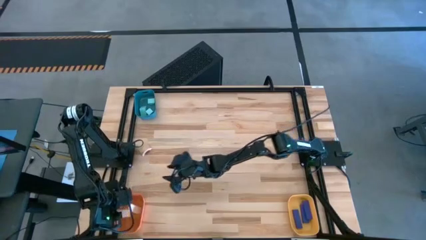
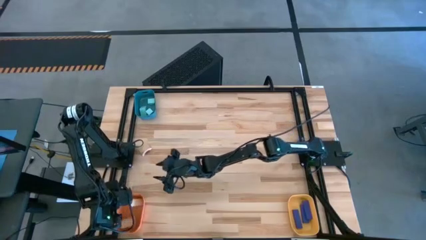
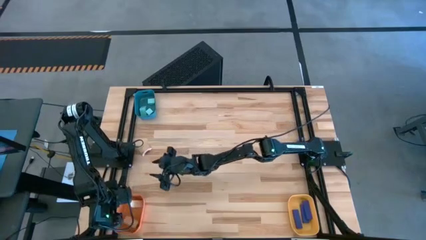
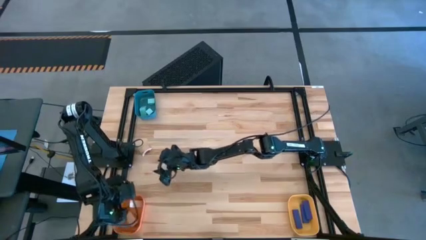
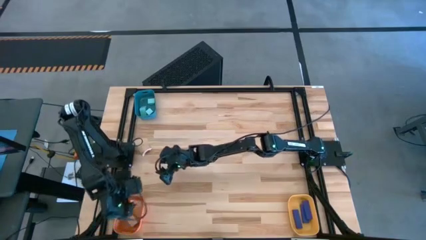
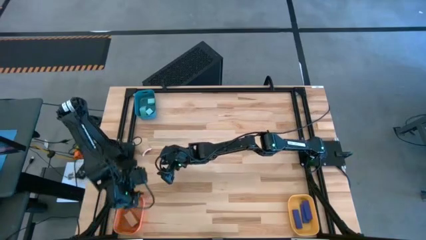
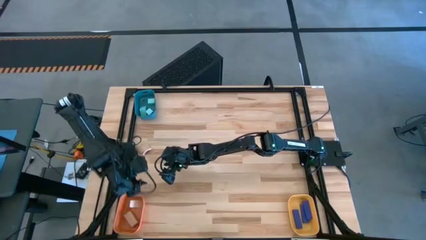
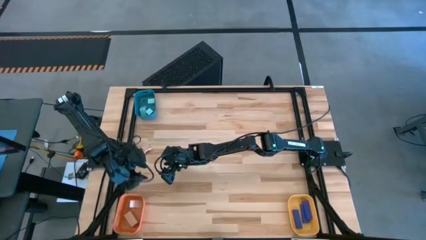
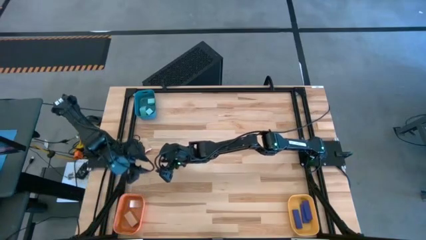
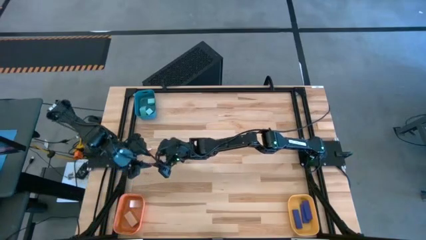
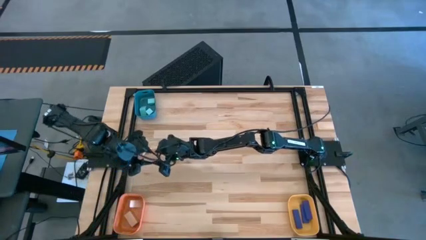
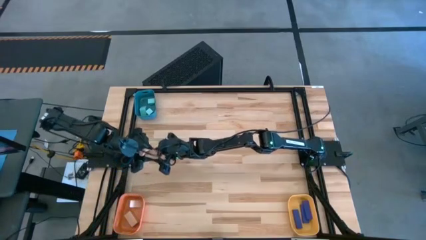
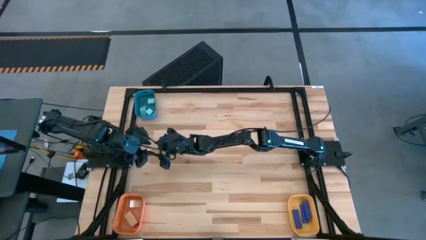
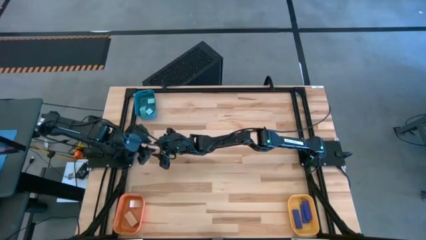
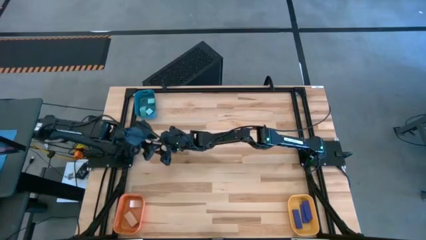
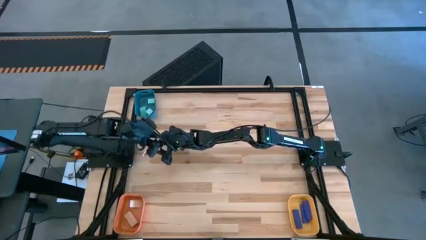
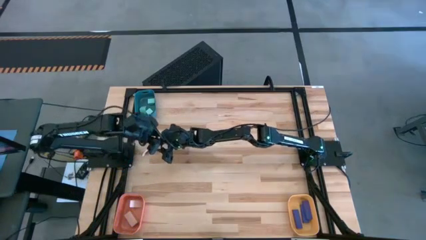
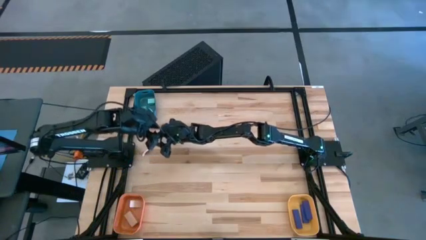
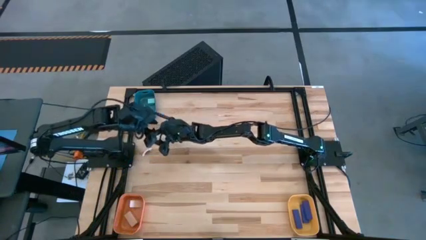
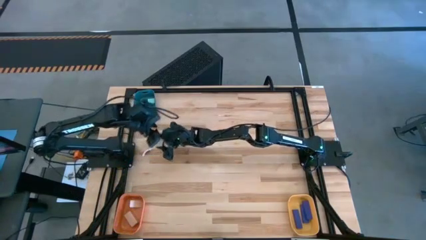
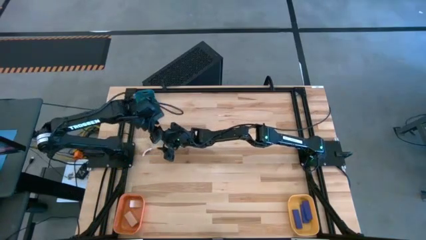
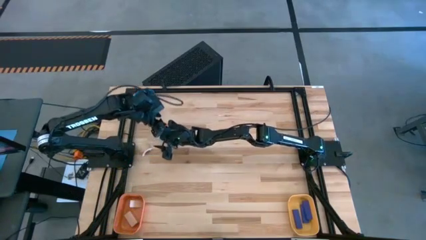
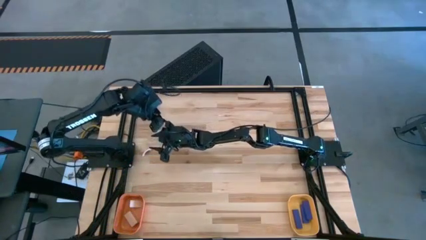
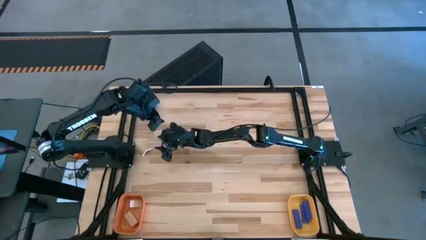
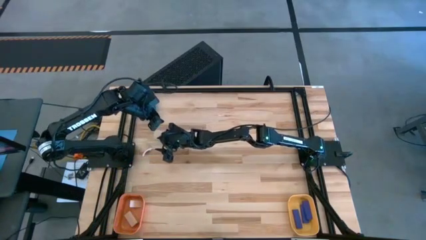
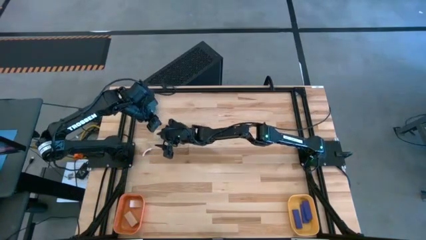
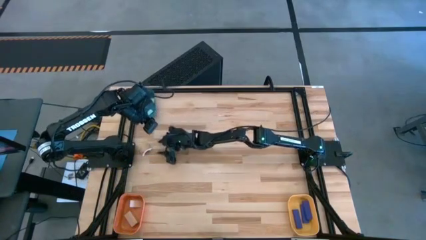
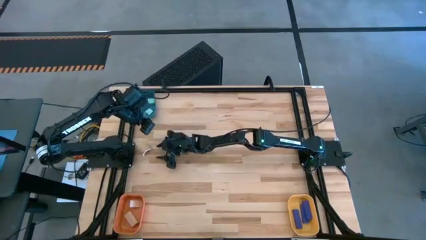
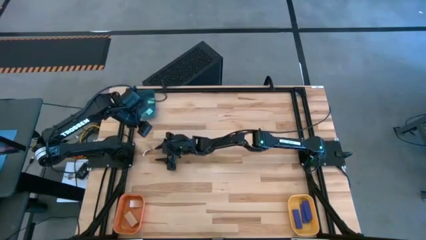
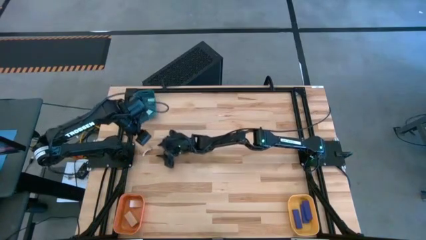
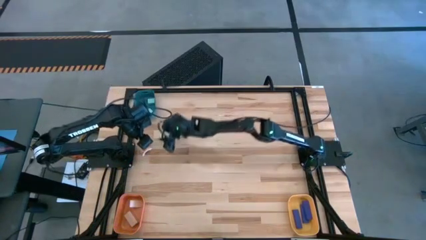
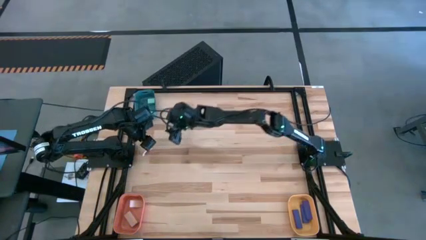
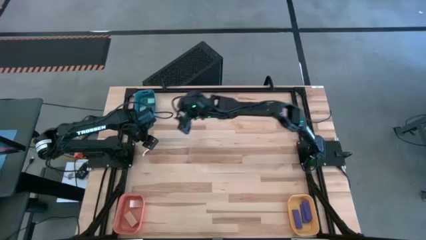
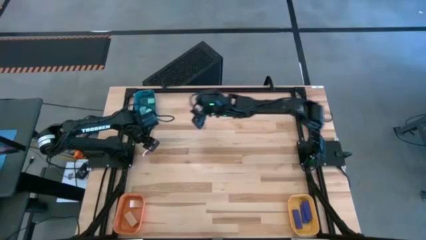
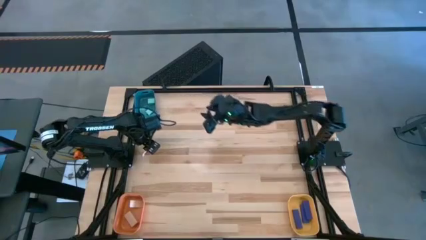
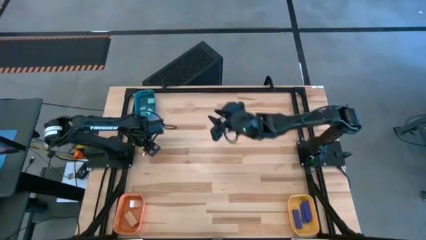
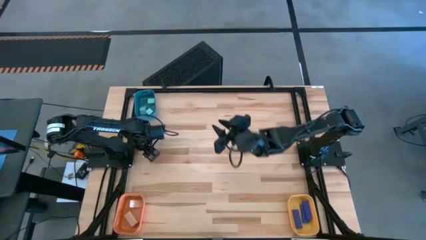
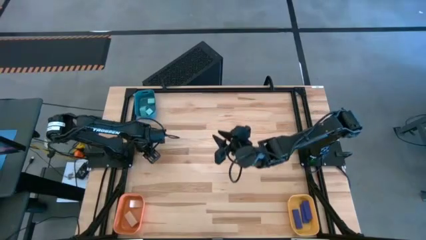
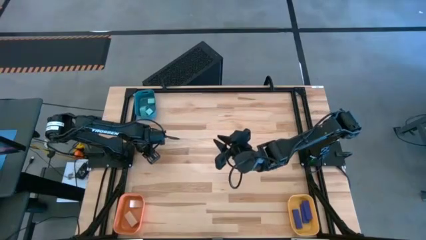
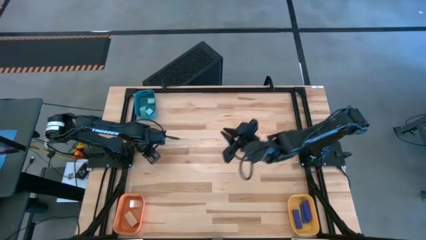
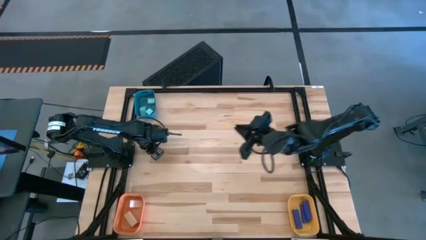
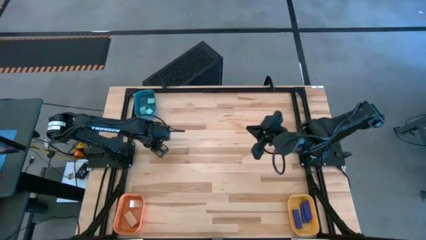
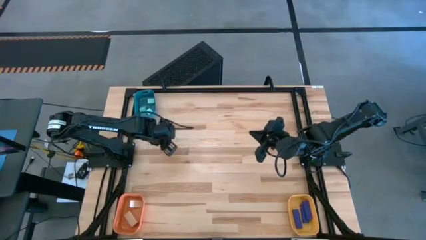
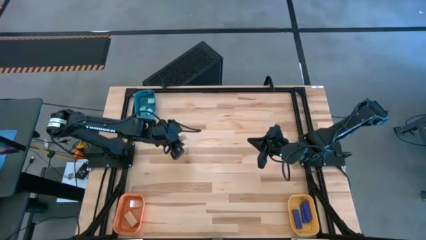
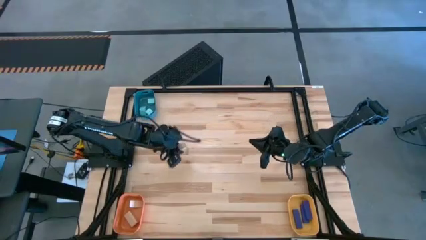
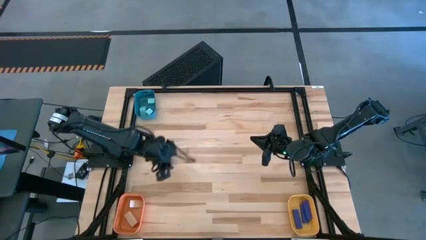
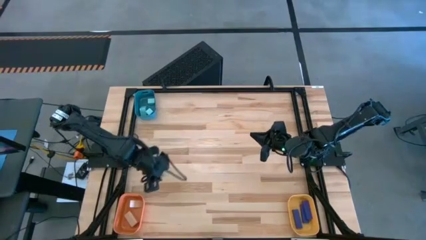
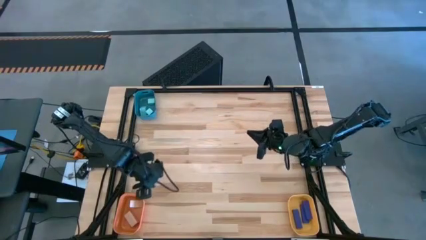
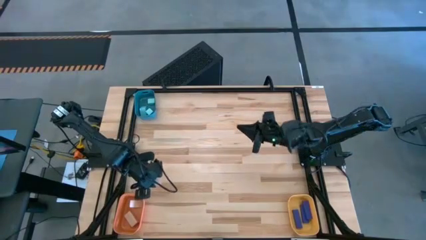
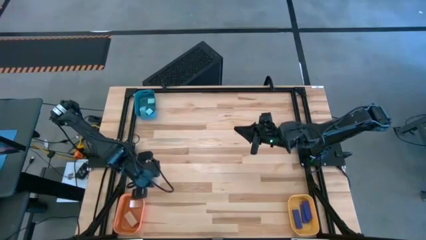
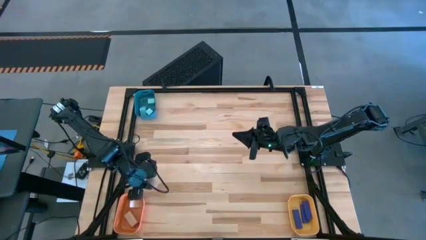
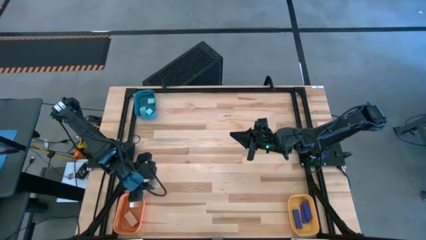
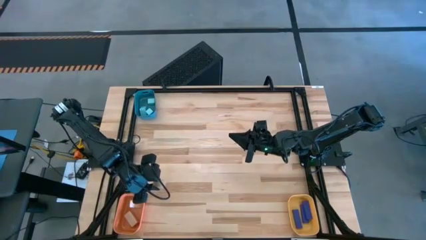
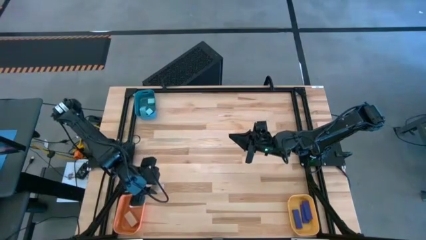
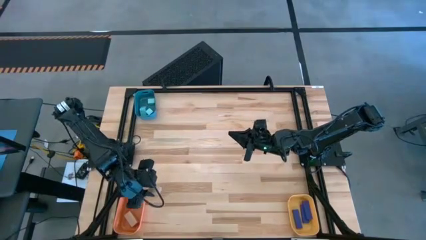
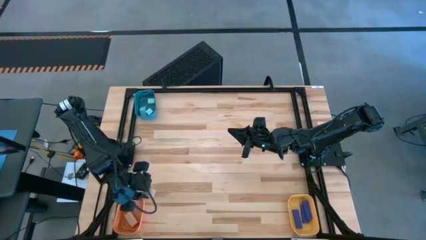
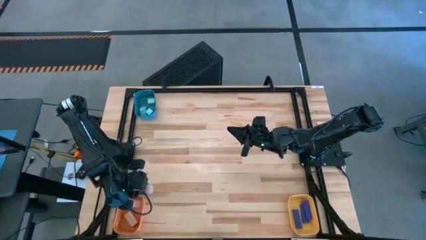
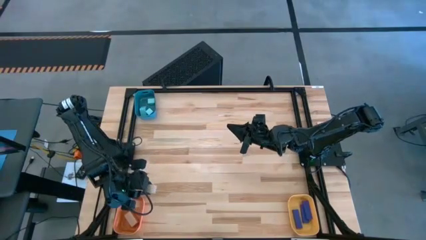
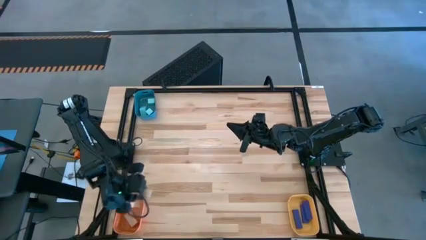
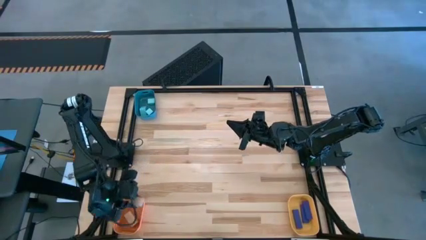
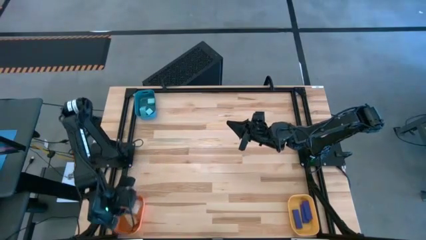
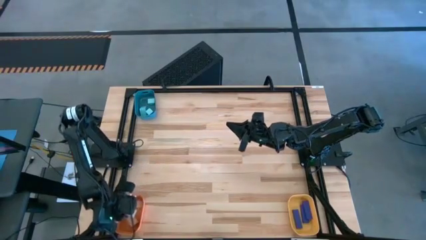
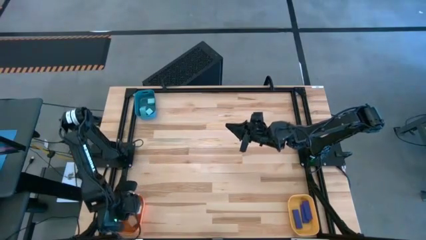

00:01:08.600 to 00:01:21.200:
Task: Sort & place blocks by color
Put the brown block into the orange bin

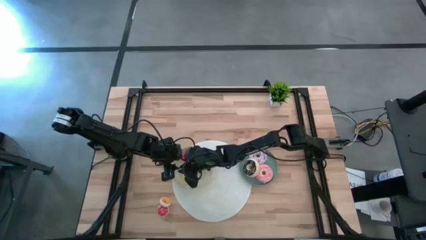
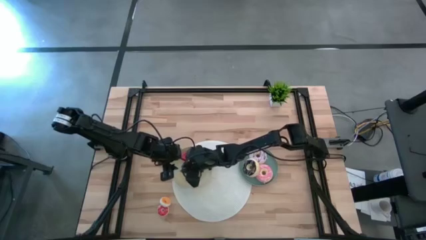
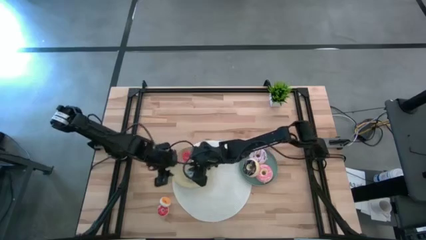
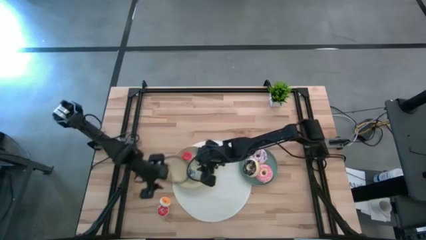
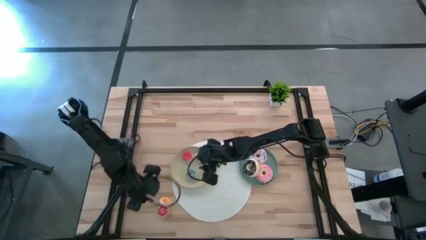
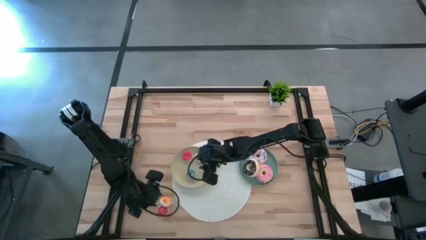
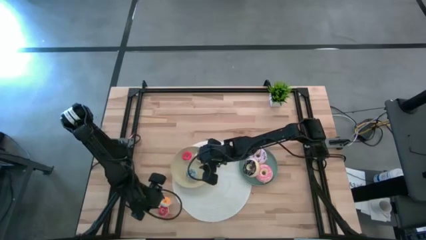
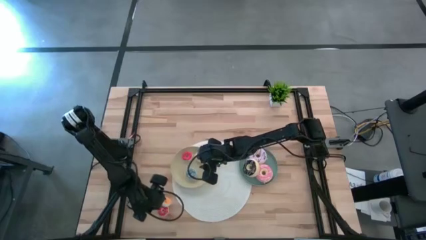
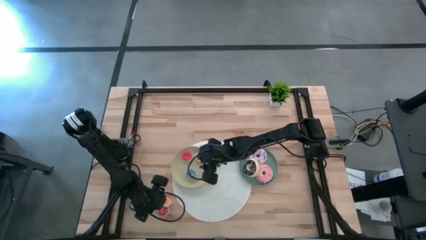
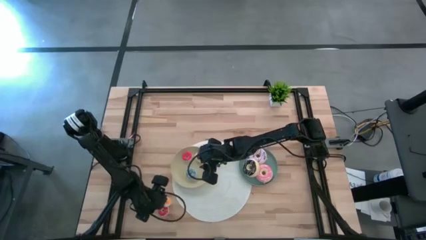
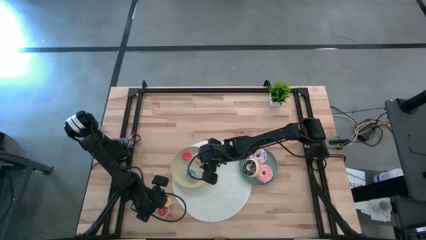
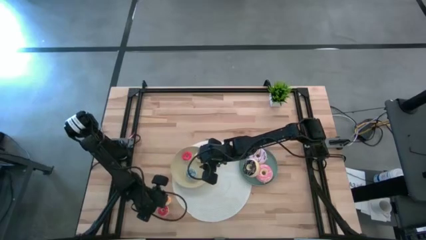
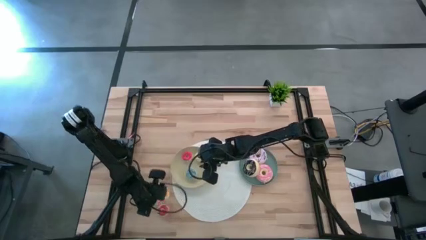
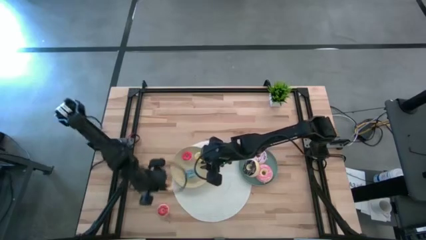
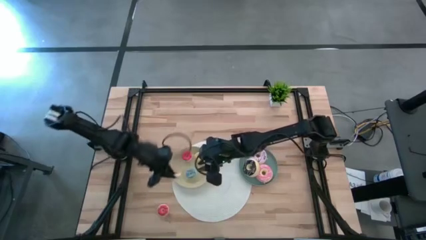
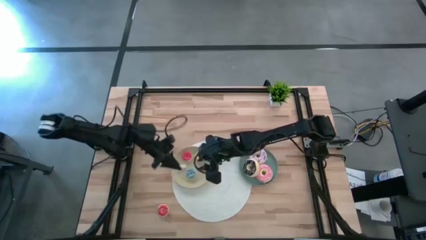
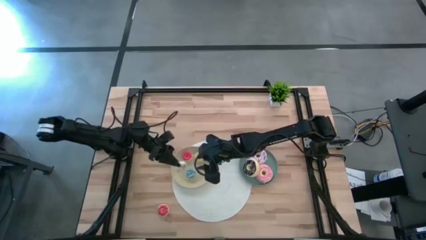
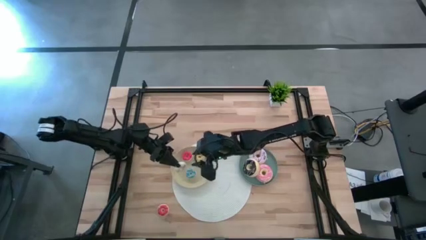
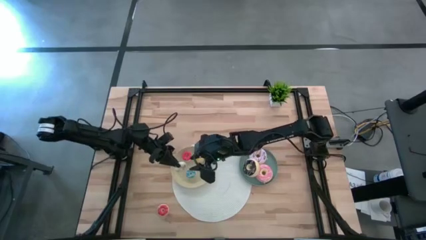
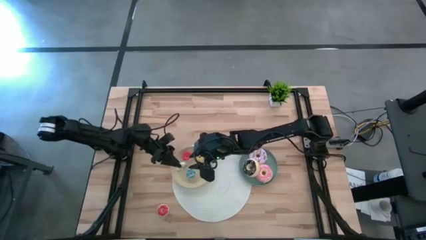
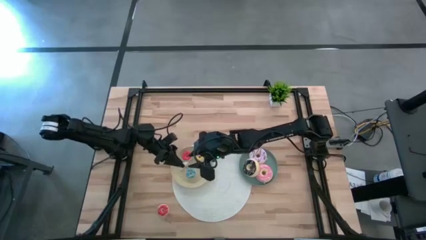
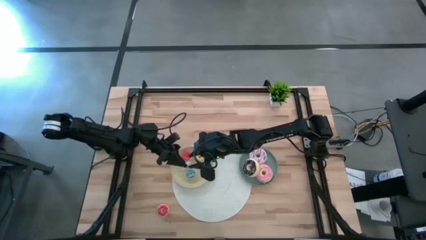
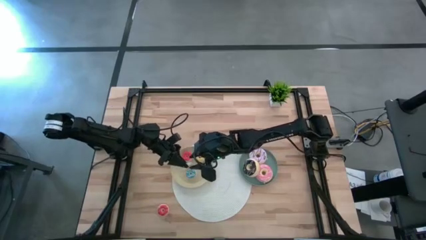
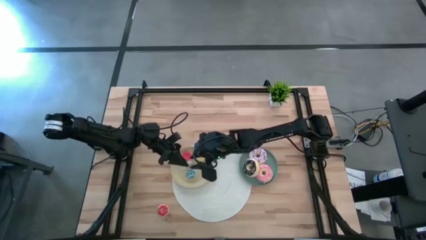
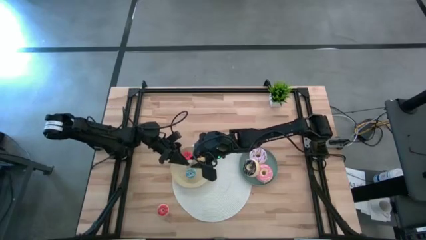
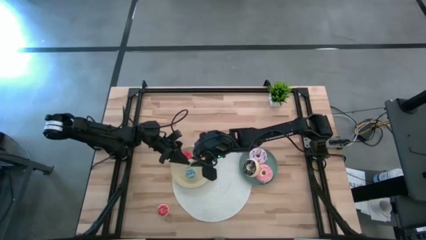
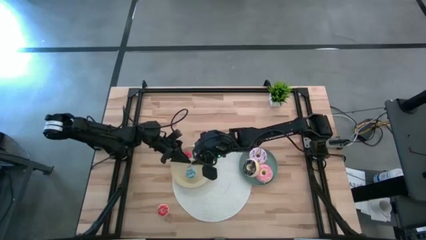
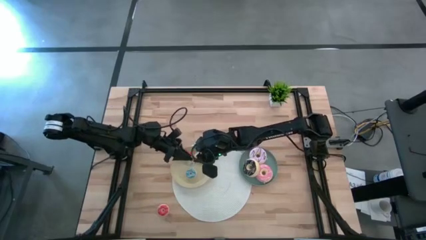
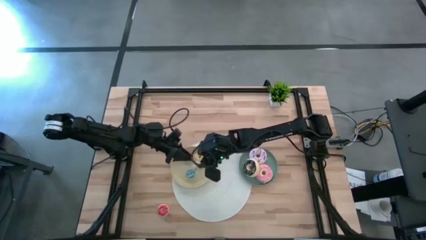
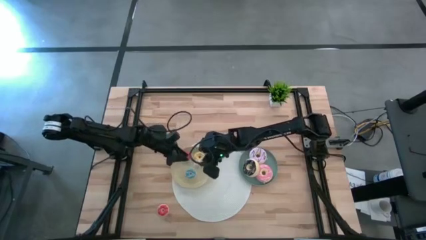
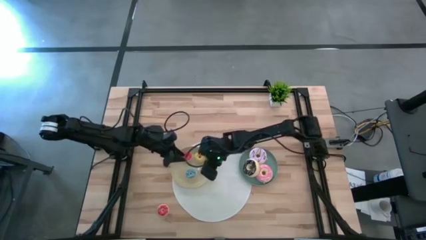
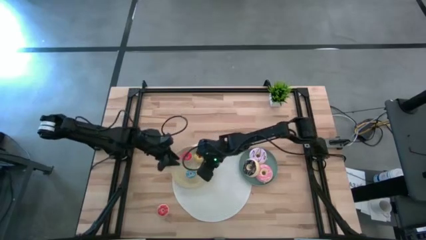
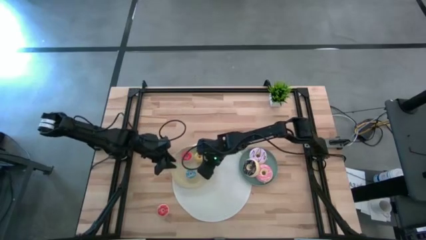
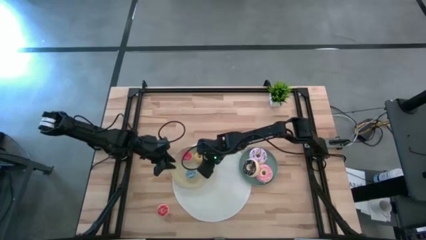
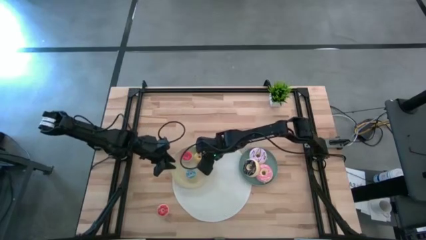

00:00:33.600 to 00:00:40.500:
Task: Pick & Place donuts
Put the small white donut on the brown plate
